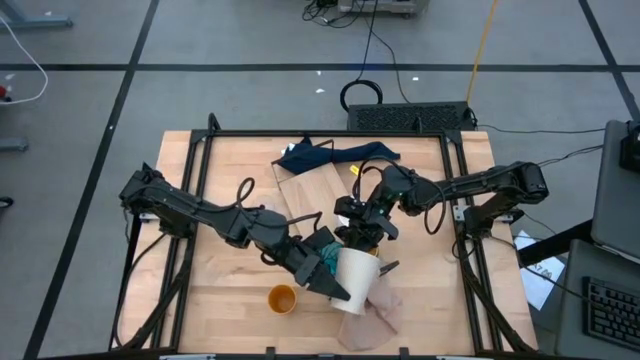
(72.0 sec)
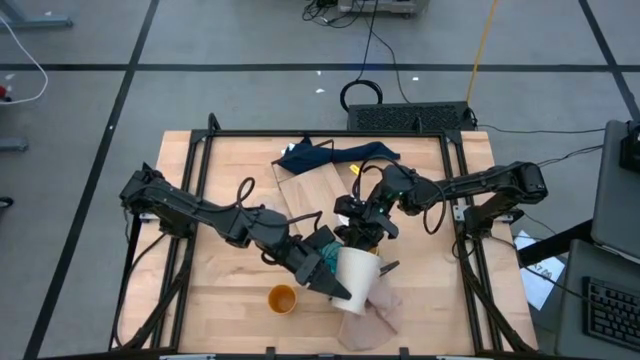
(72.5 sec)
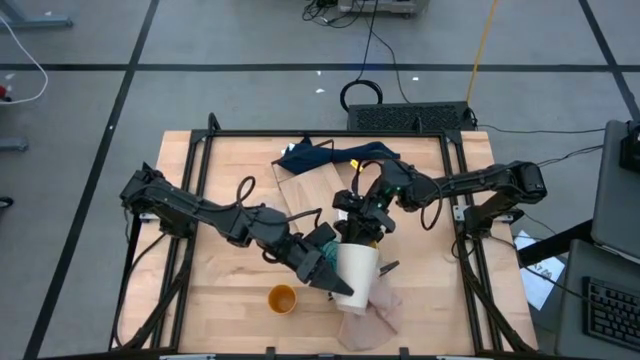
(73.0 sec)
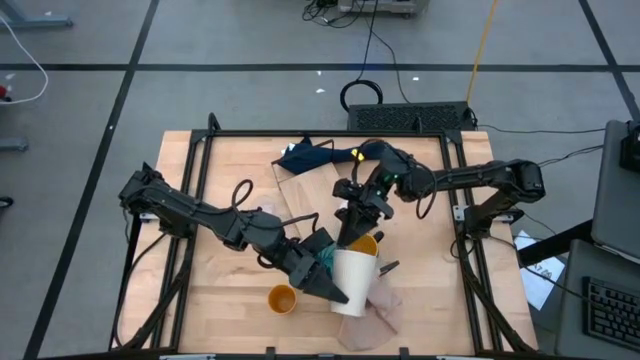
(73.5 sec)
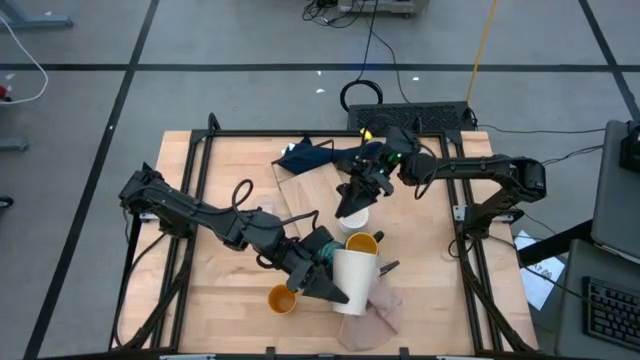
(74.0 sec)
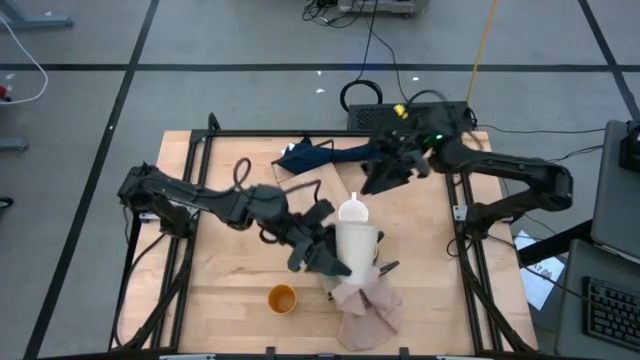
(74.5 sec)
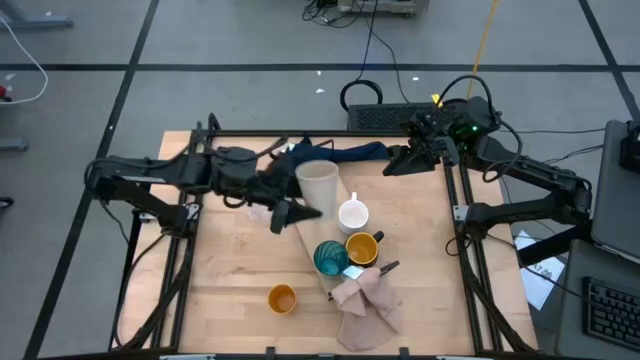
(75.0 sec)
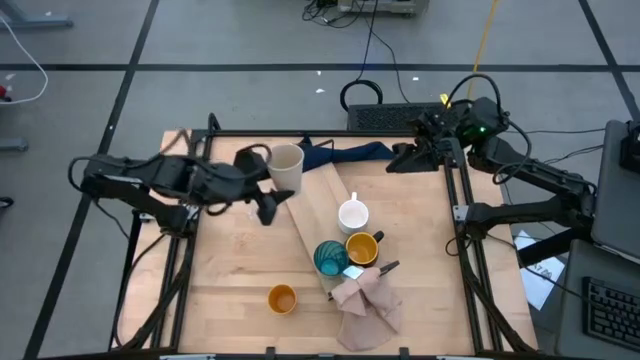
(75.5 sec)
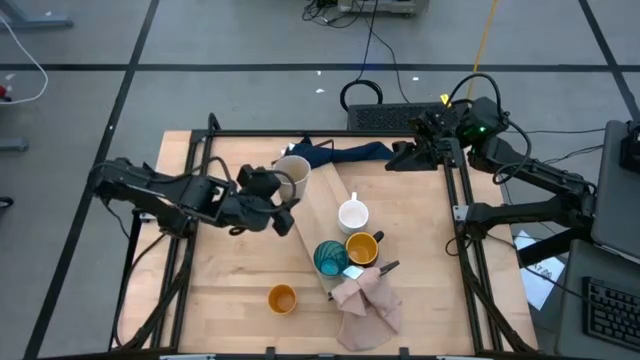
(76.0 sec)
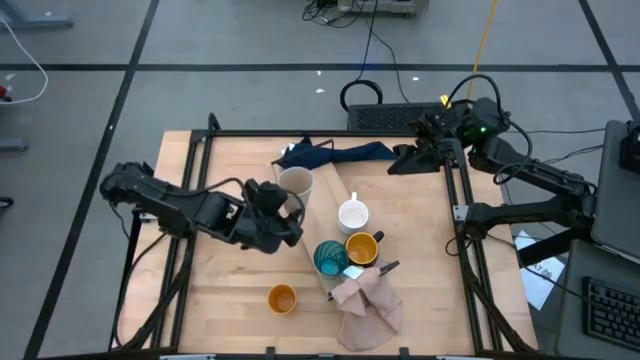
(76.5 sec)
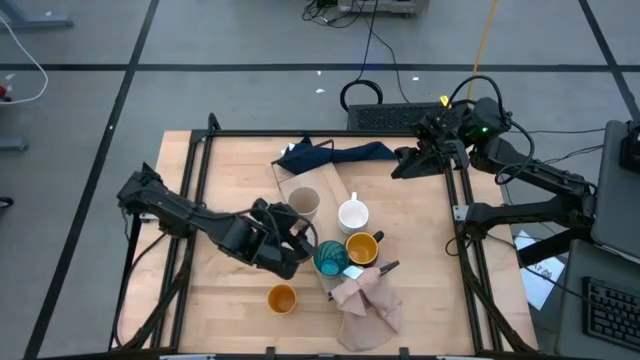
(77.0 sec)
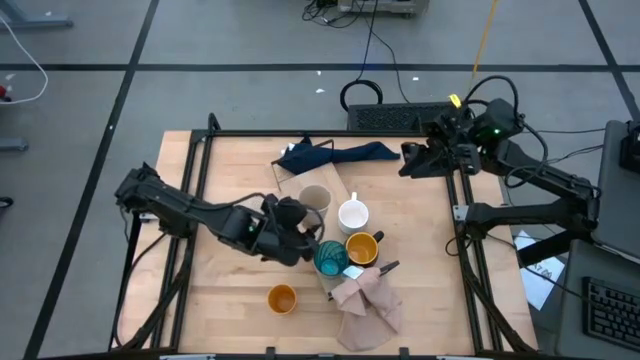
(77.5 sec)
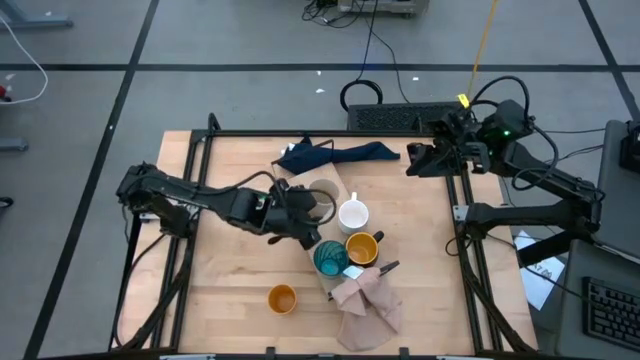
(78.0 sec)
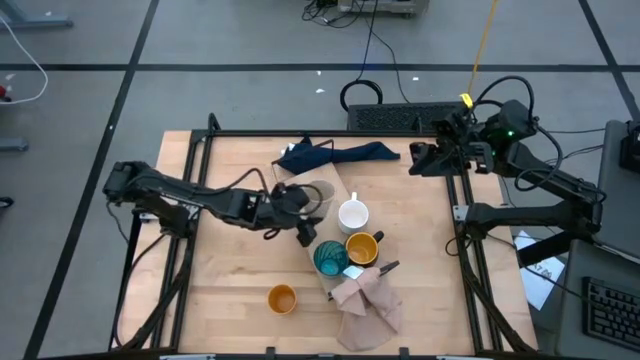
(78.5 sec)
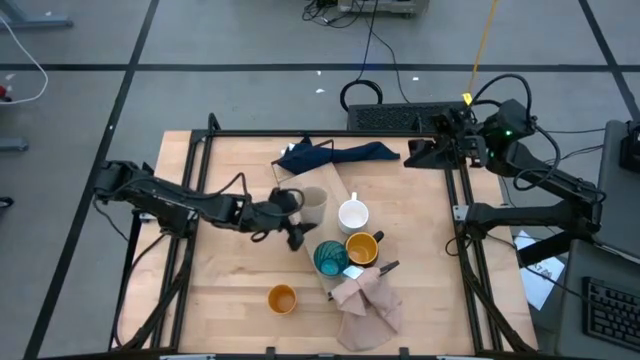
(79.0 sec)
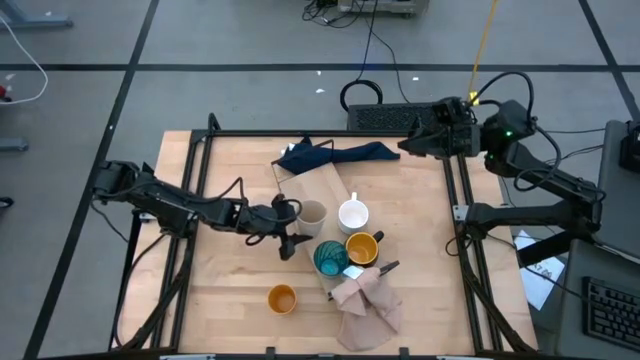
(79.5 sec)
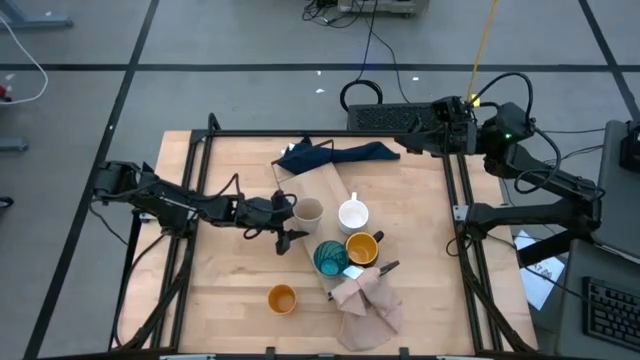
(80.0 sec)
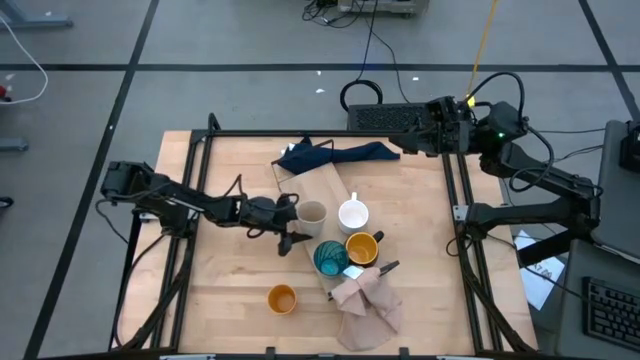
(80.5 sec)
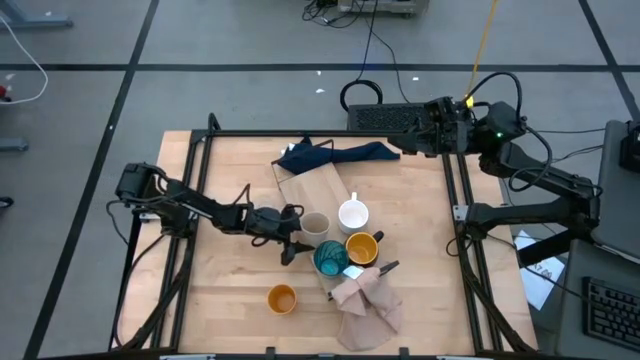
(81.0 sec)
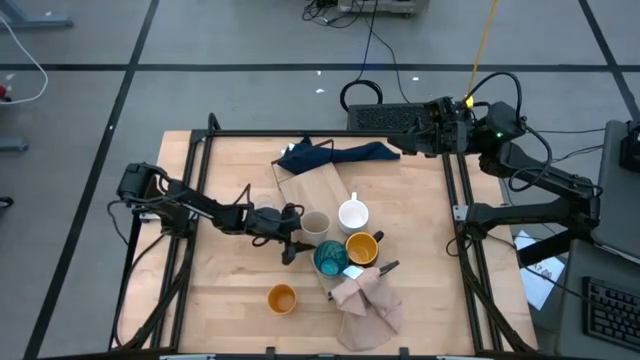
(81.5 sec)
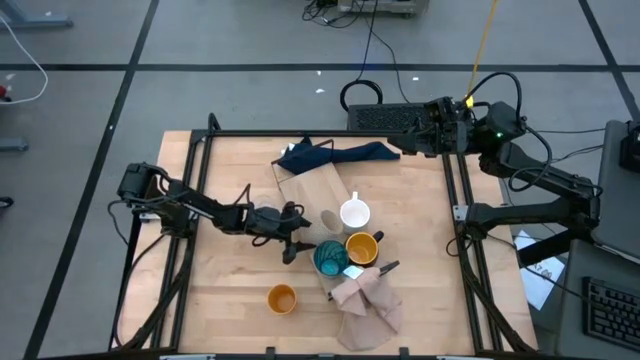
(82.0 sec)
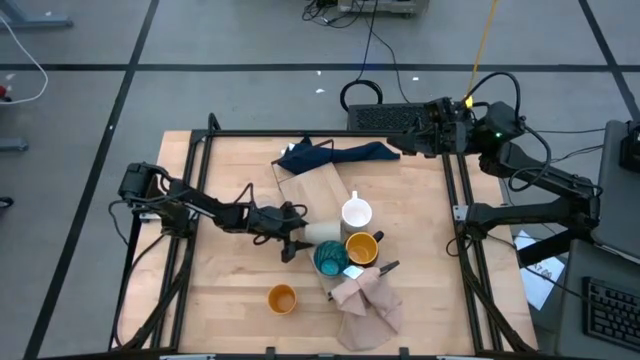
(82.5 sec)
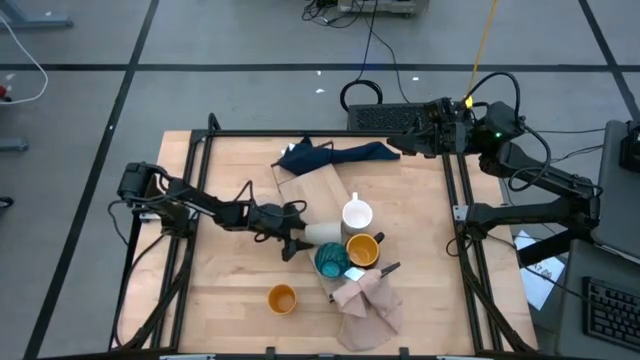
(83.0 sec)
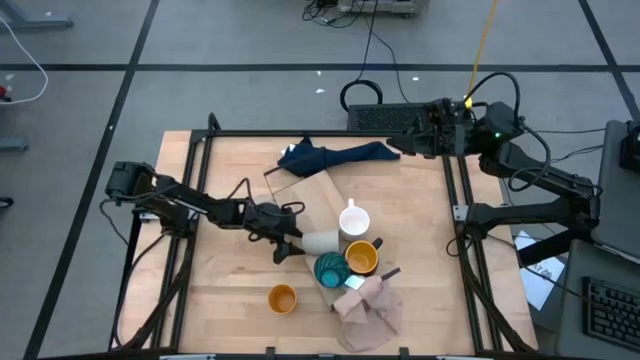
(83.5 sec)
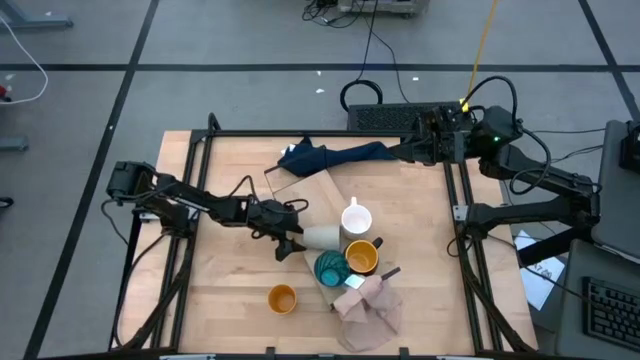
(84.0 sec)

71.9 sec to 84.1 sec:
Task: Stack small to large cups/mugs on shelf
Put the white cup on the shelf

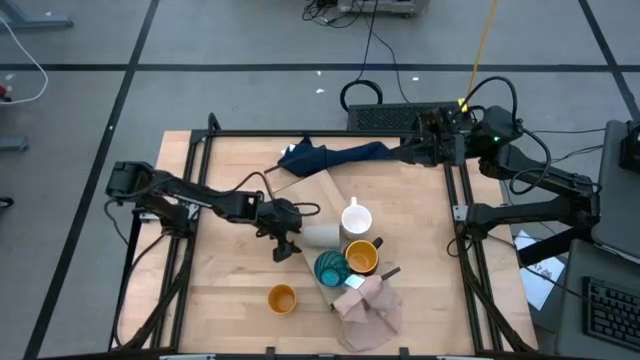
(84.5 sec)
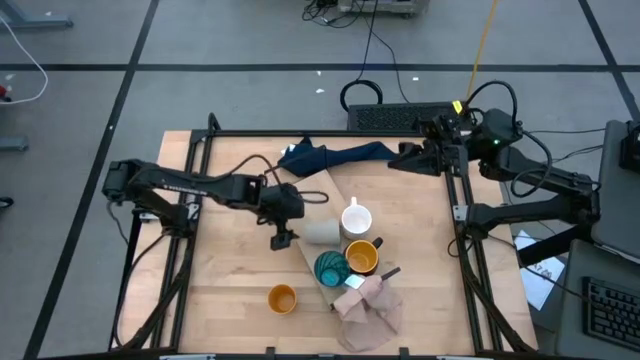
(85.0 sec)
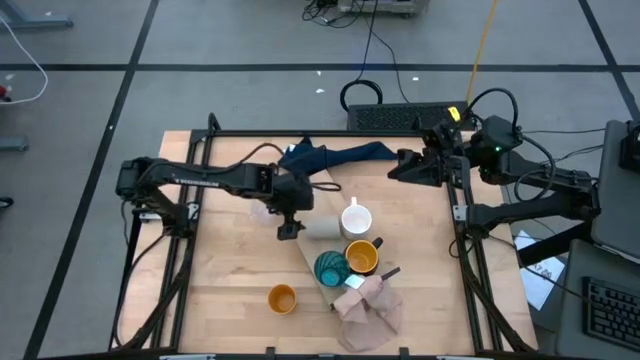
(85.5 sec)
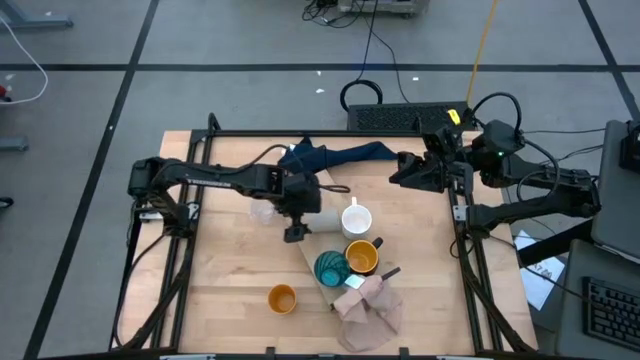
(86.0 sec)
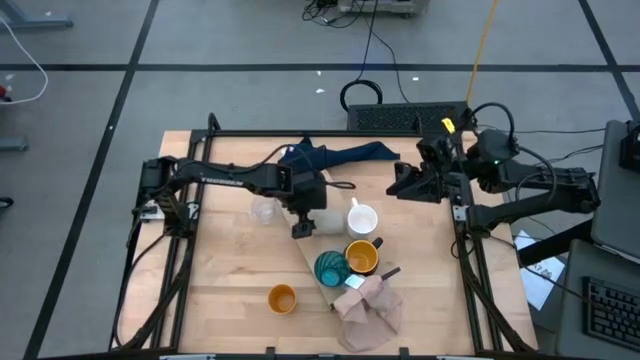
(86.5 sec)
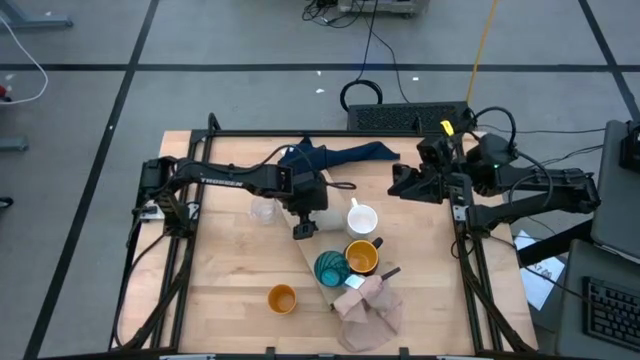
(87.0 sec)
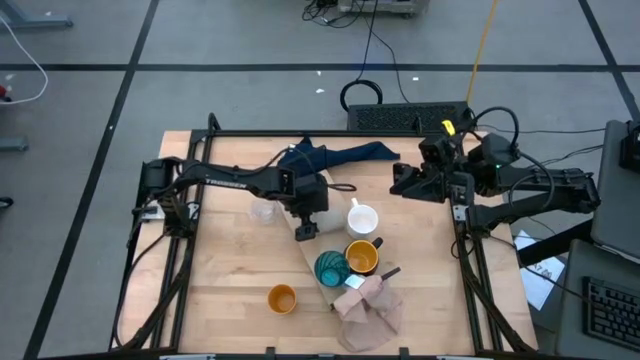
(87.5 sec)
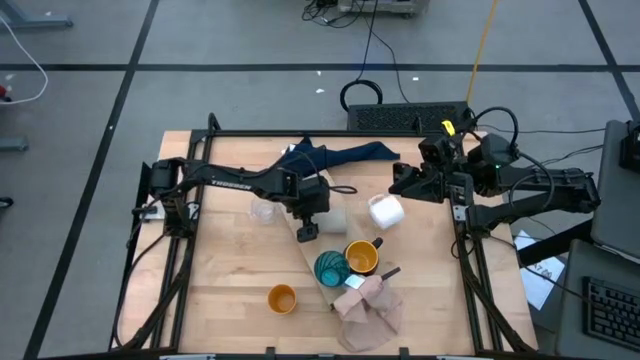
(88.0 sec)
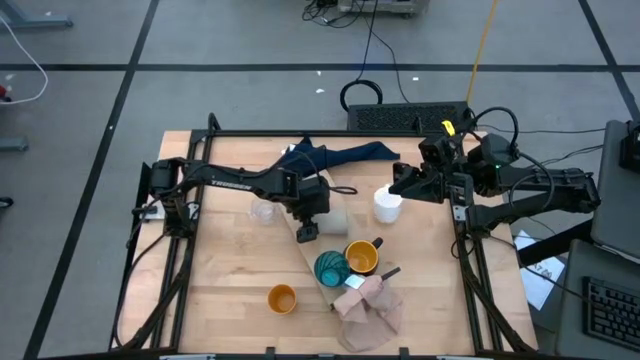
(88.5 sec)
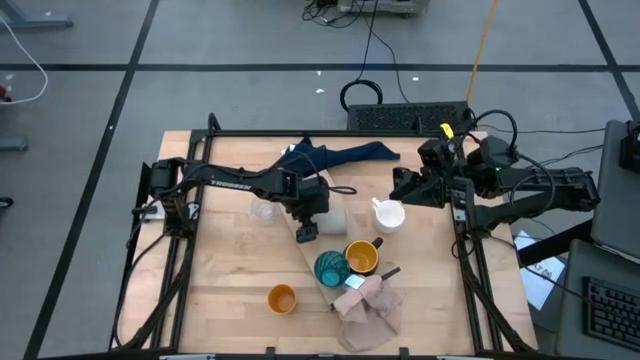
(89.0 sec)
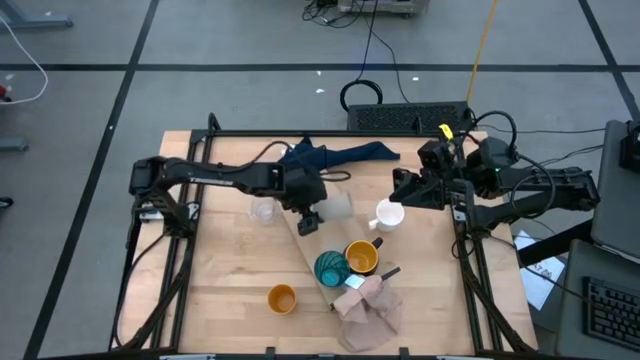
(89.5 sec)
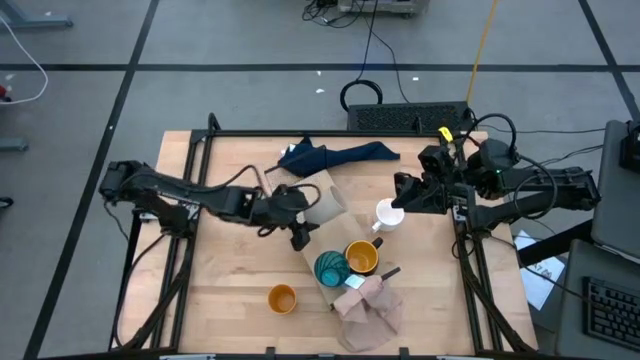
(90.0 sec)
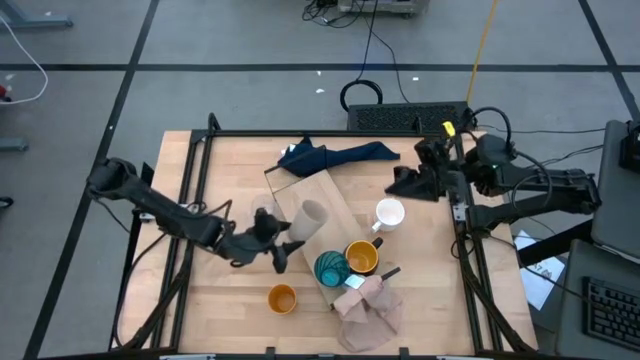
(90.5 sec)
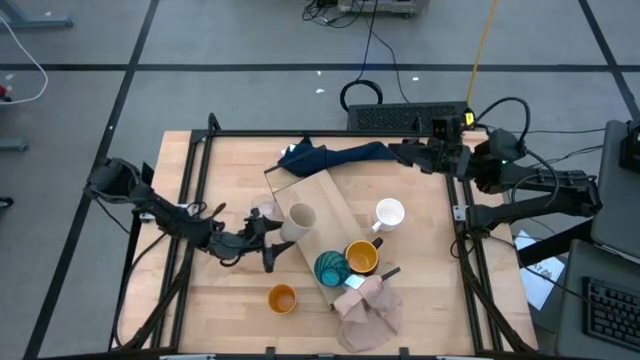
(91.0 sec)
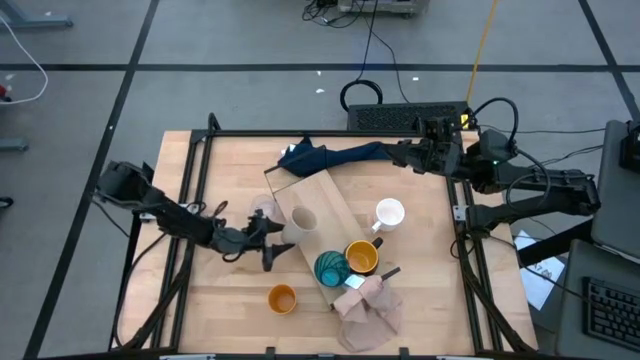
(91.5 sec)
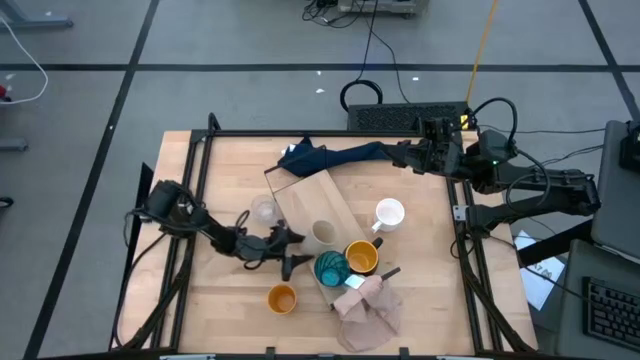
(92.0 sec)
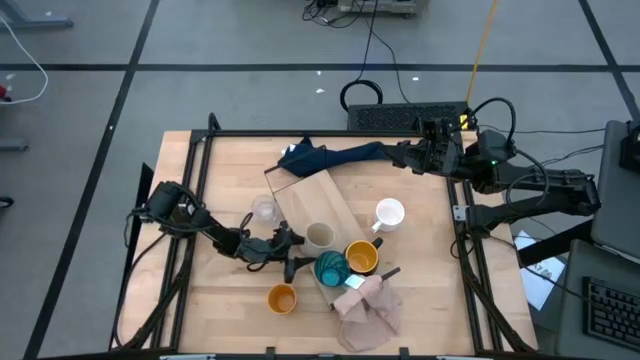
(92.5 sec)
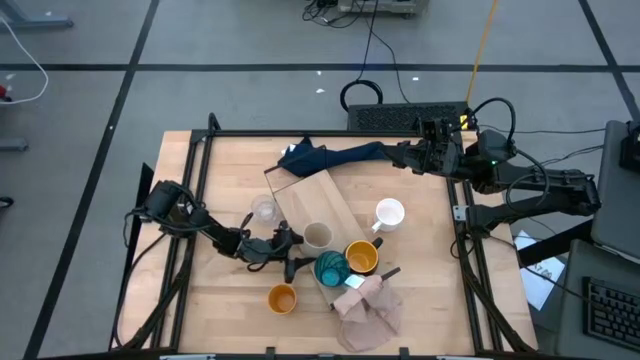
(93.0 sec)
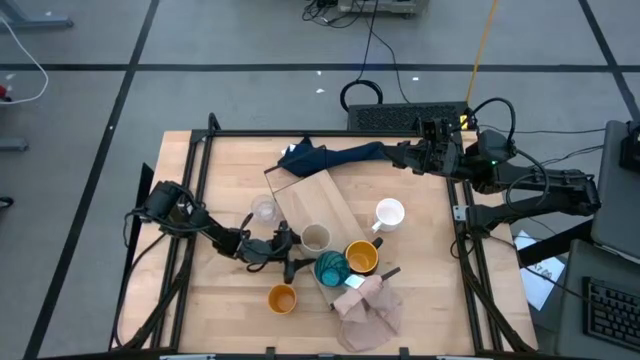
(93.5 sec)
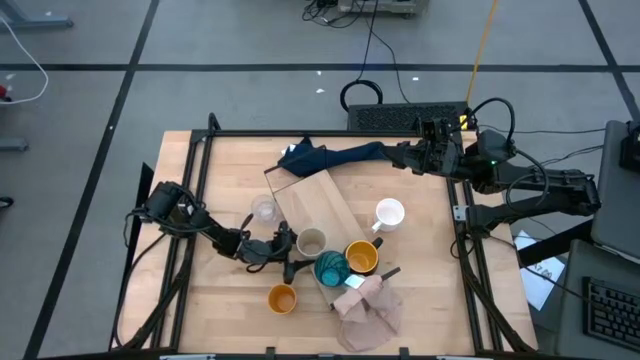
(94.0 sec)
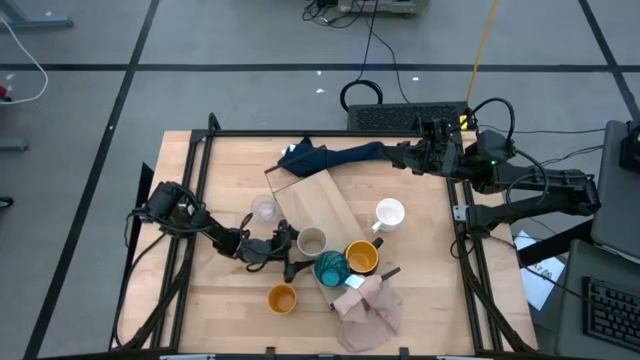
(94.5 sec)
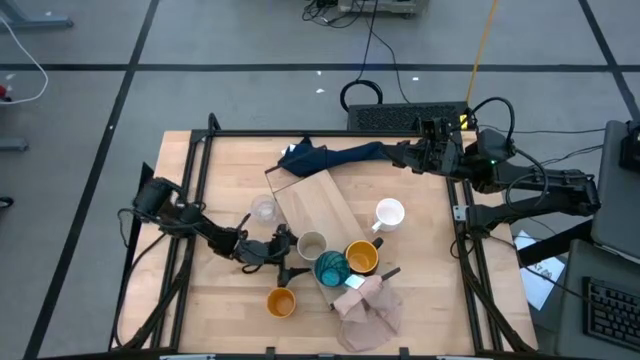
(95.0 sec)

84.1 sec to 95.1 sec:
Put the white cup on the shelf
